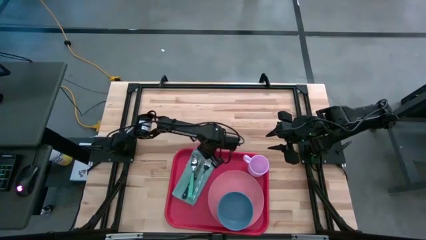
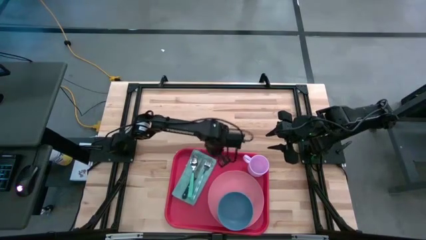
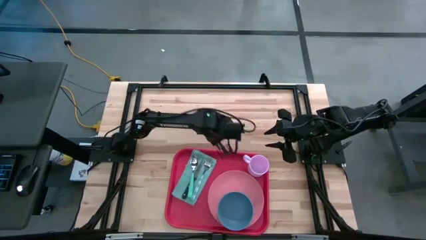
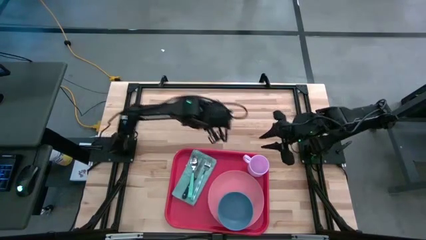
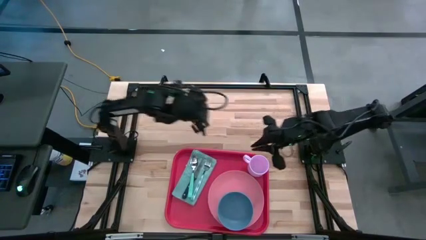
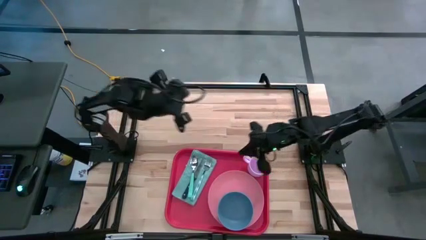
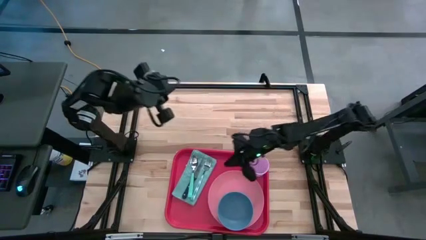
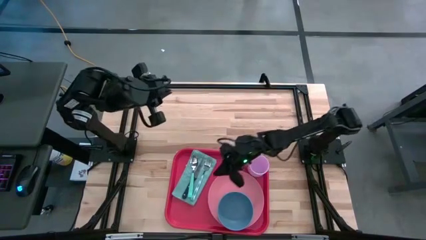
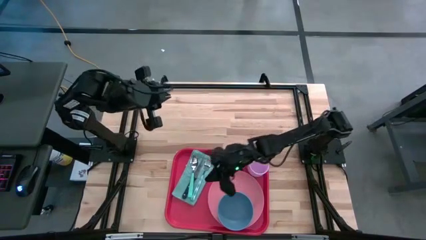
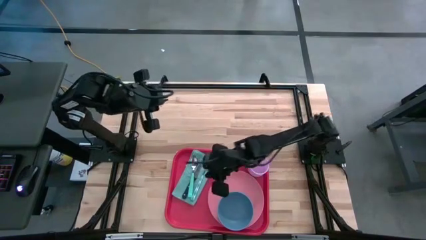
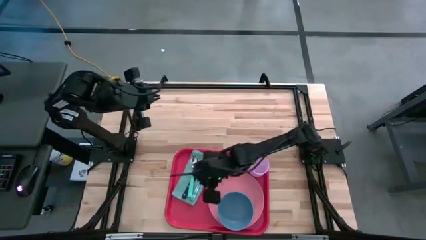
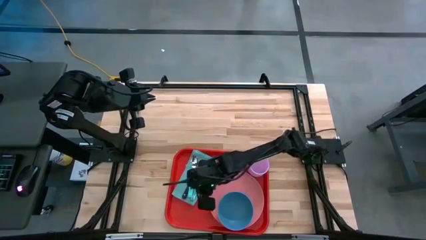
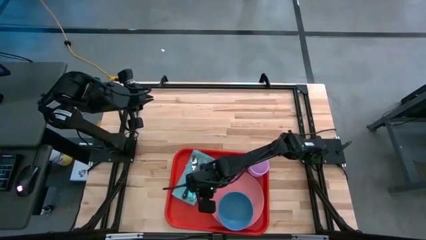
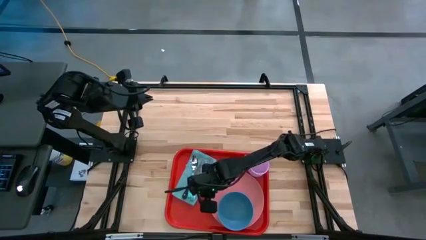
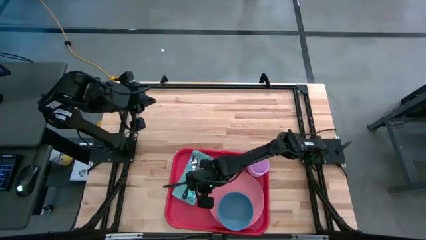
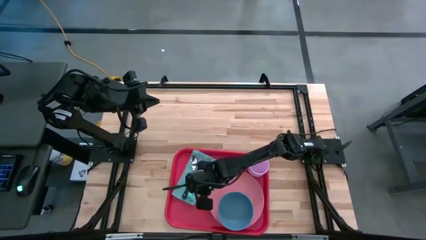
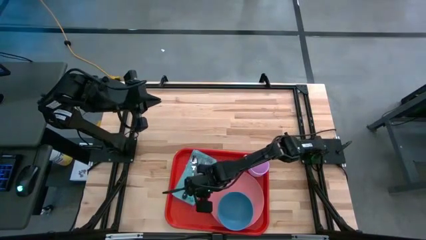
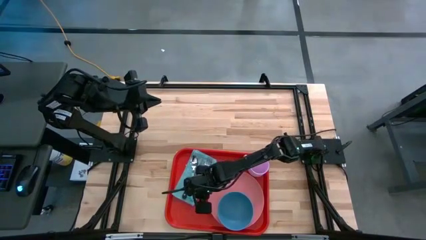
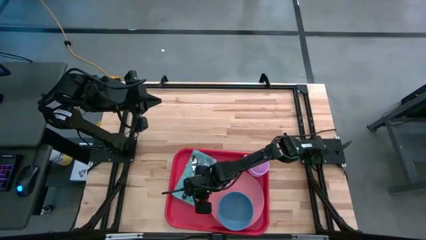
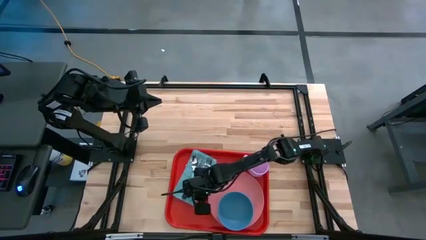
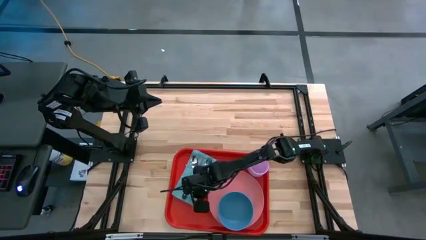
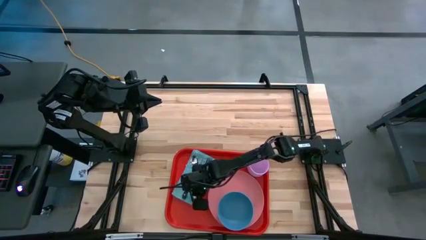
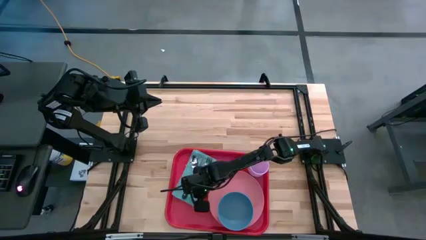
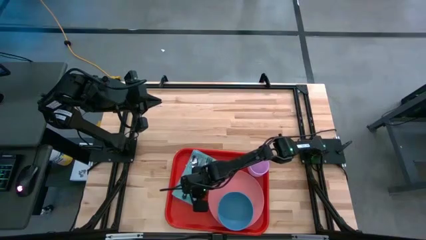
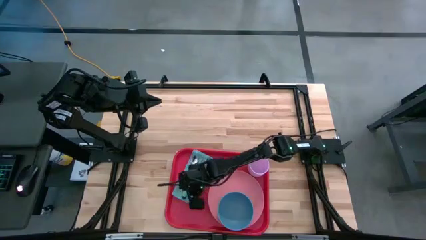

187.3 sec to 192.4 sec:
Task: Set up tray
Adjust the blue spoon on the blue napkin

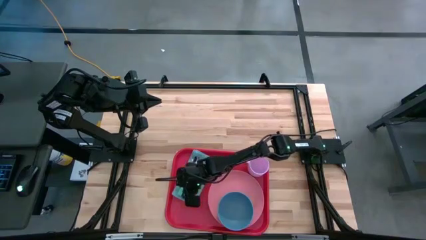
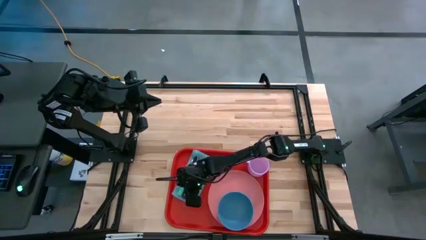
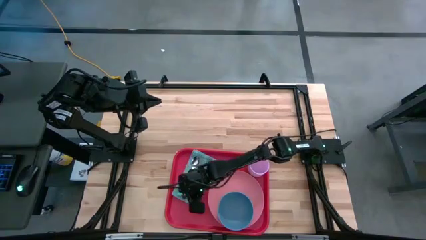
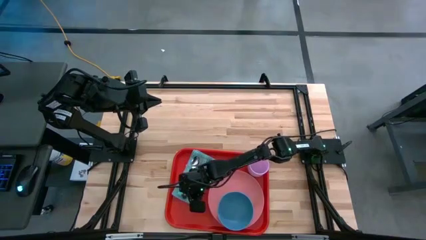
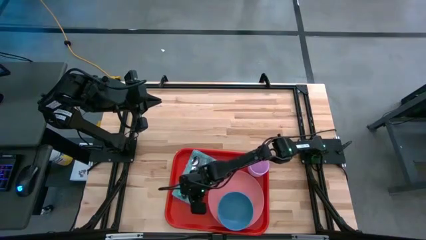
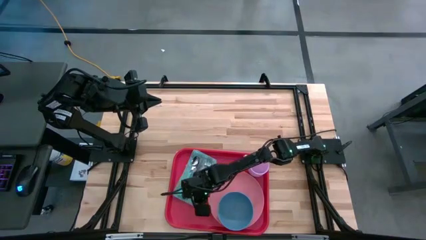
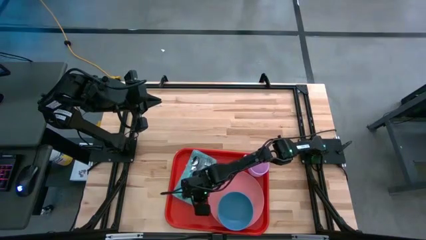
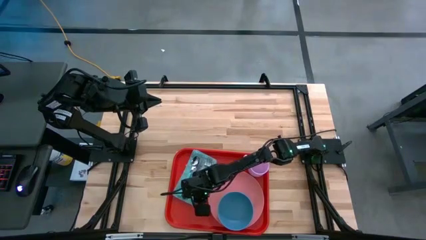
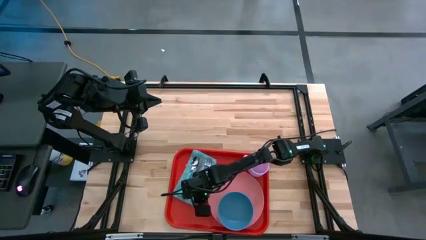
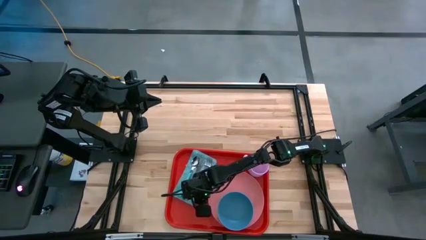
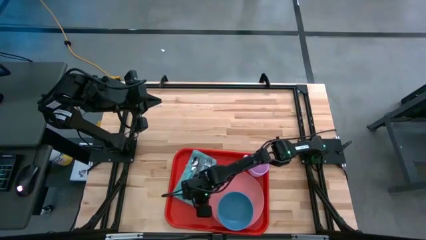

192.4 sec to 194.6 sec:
Adjust the blue napkin on the red tray

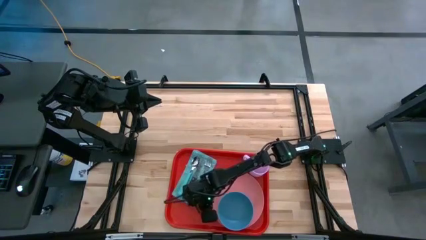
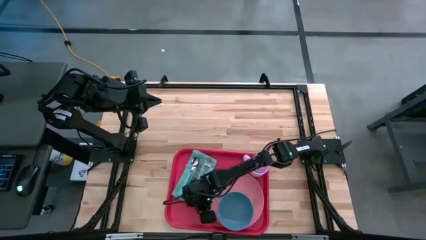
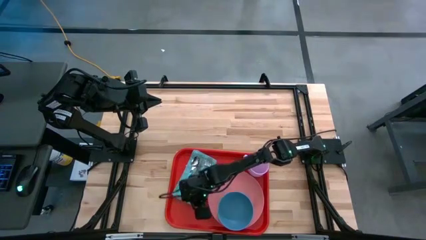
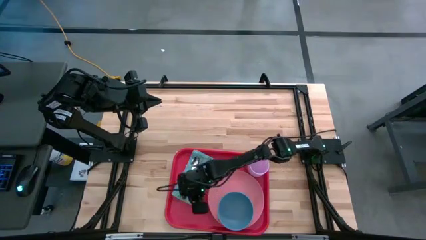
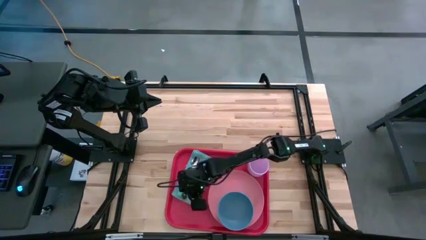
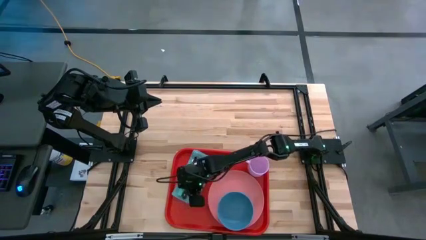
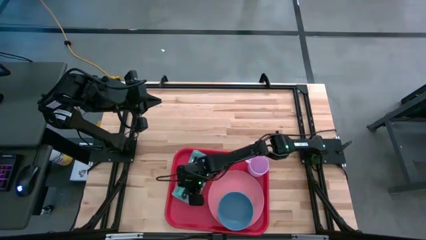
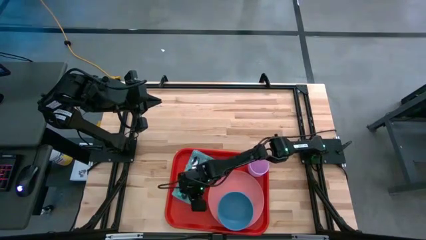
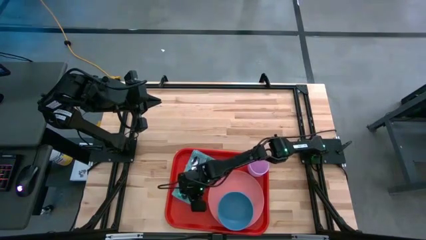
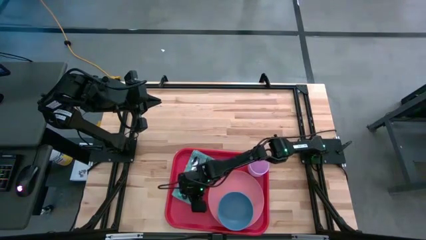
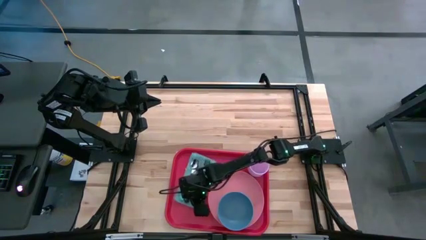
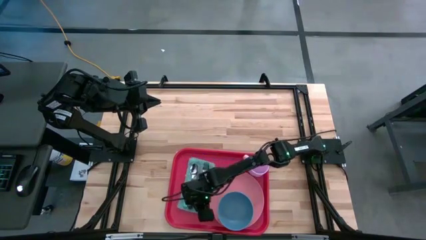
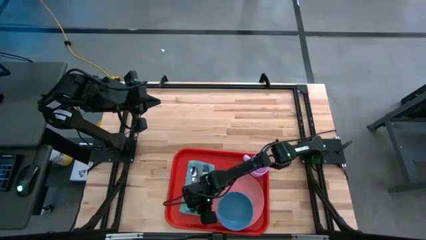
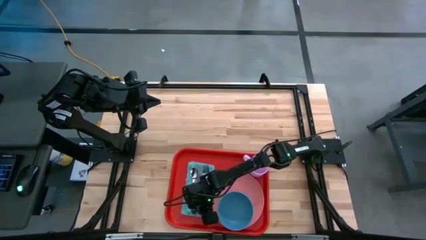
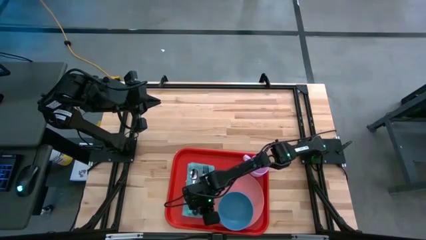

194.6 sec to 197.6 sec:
Adjust the blue napkin on the red tray

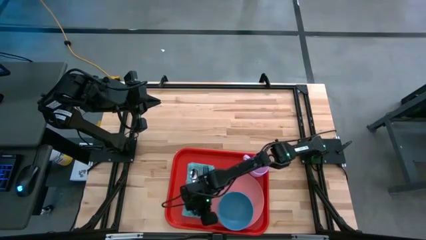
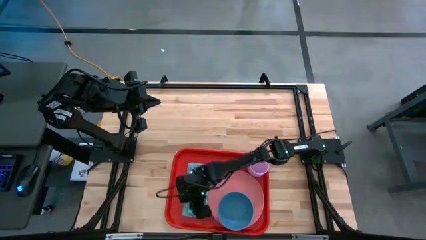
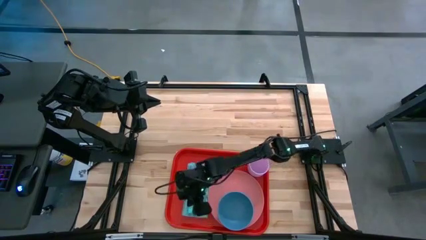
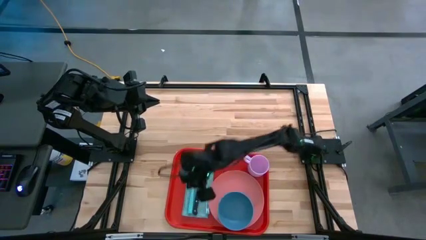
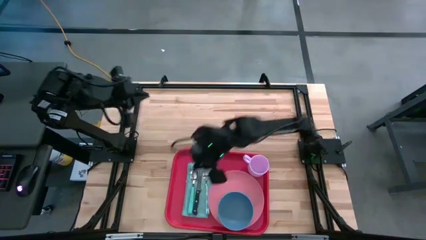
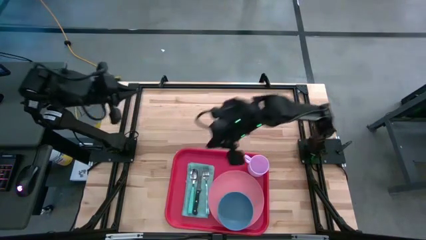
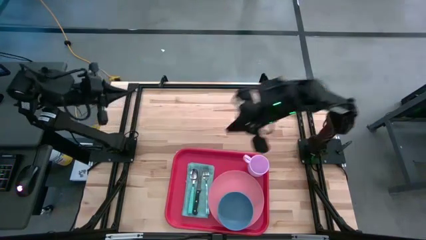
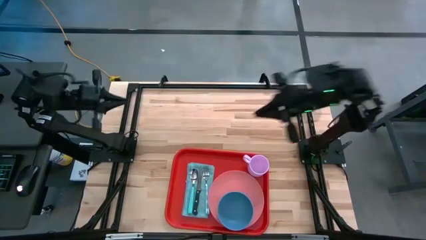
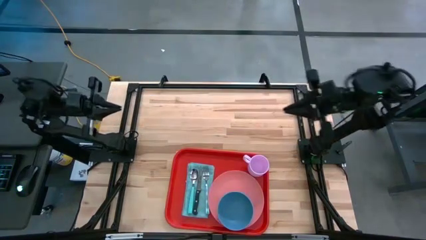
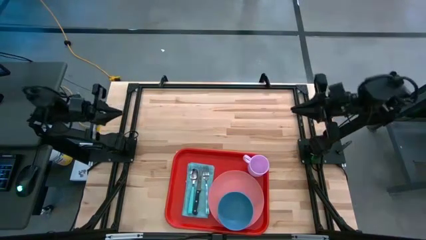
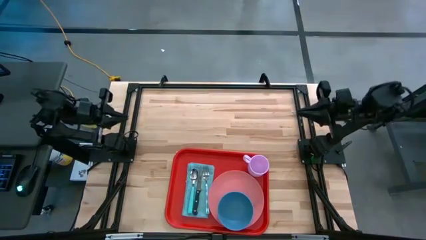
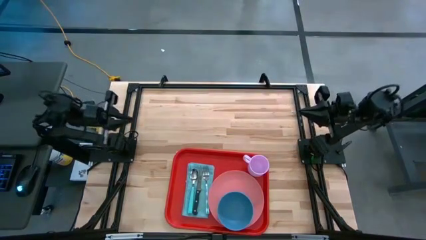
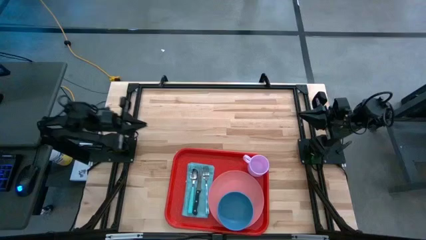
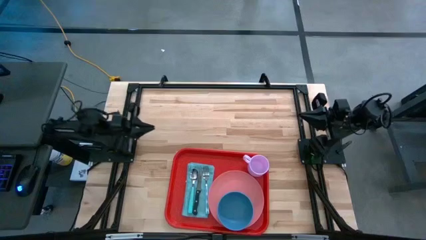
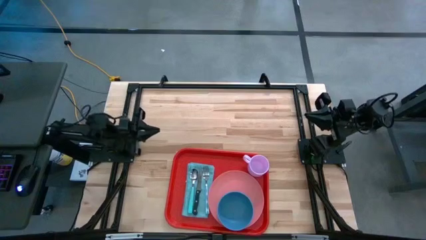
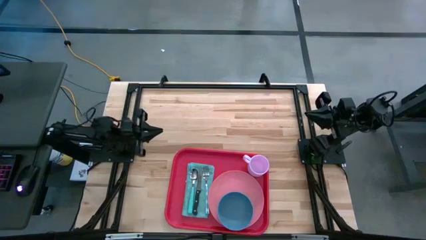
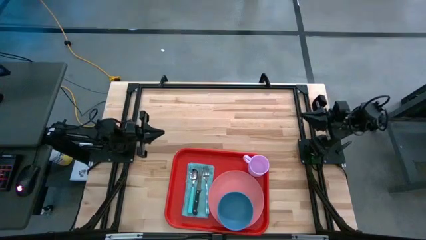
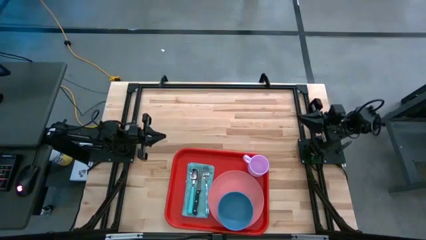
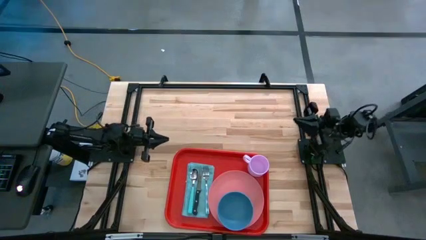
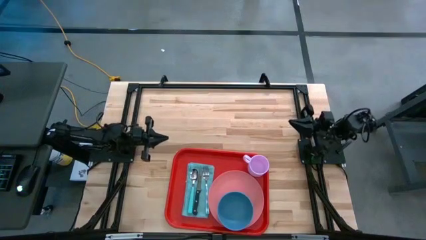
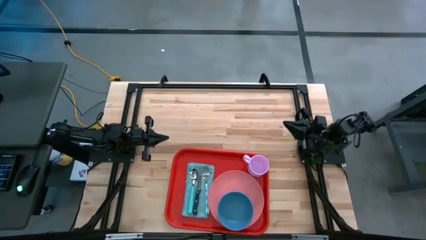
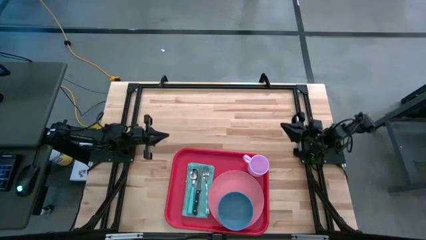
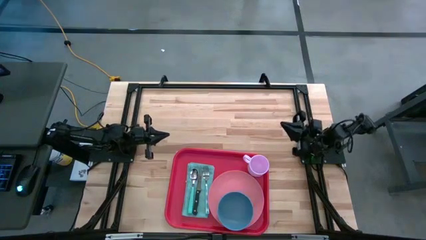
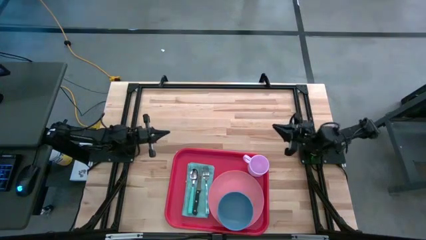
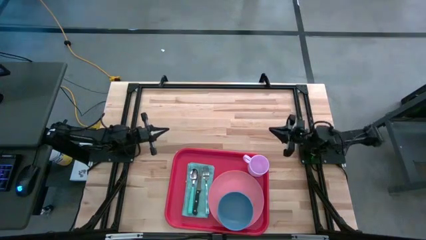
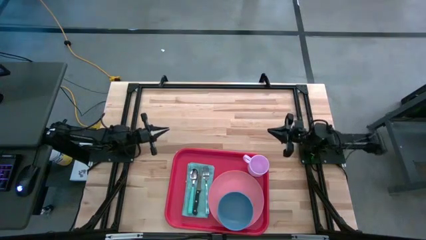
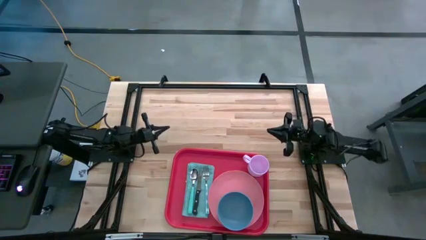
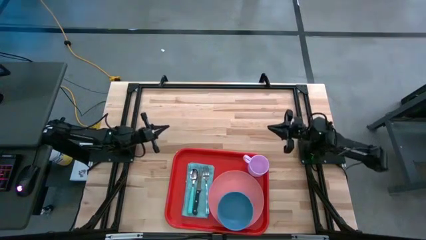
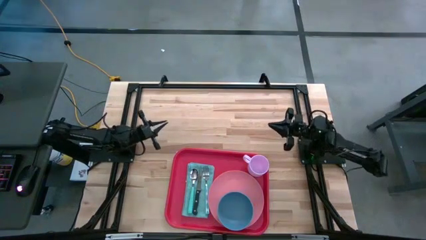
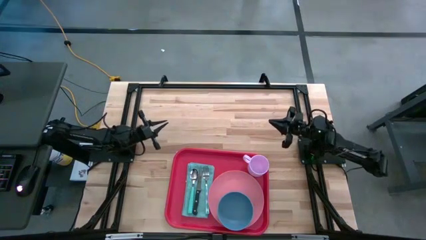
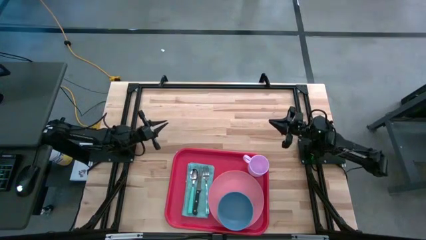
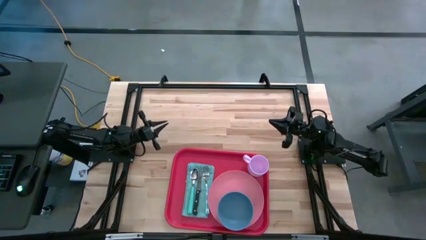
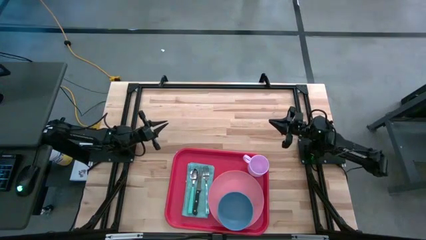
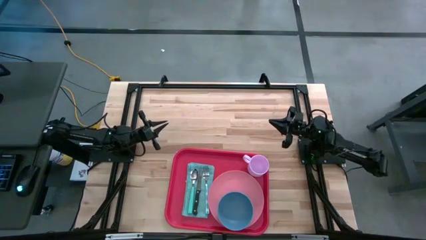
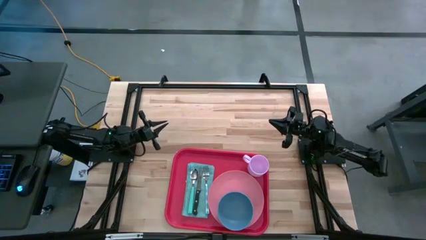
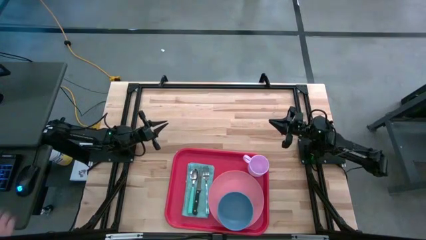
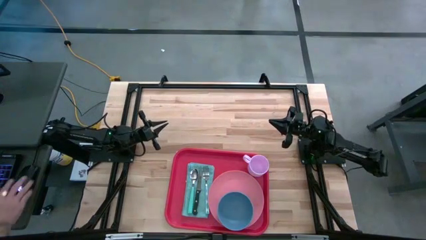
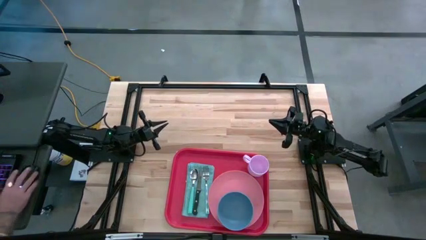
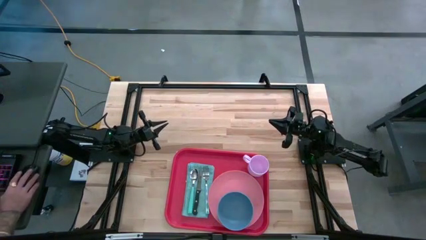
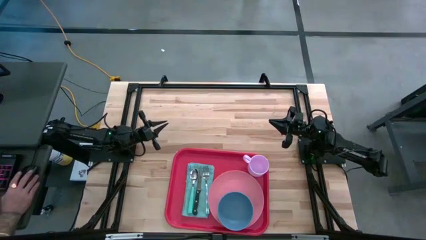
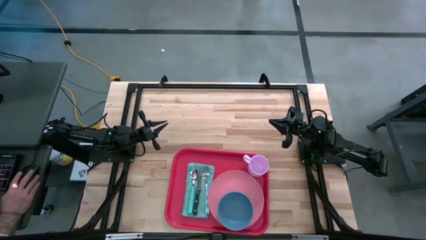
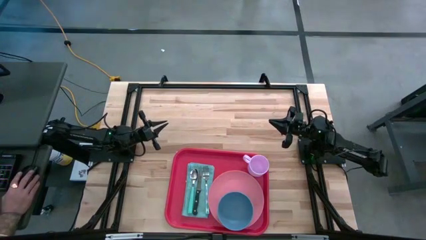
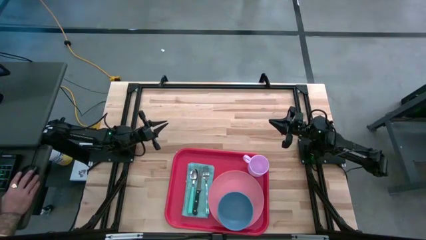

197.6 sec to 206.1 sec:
Return to Home Position
